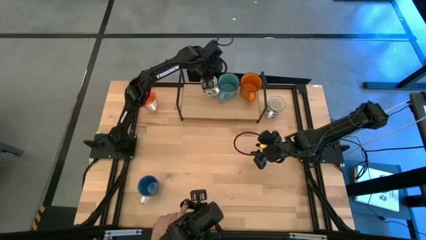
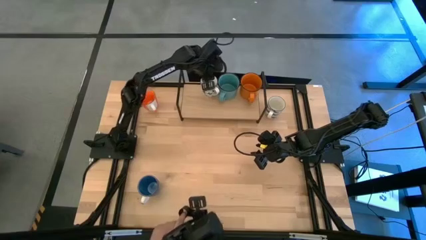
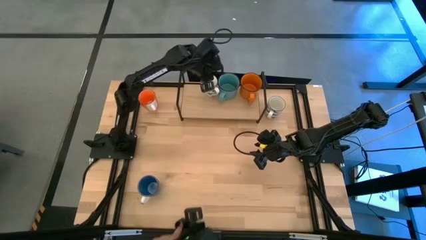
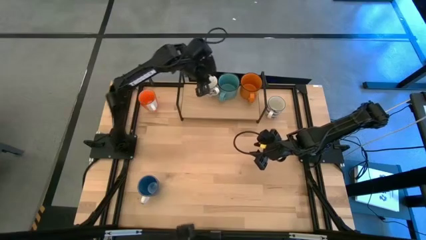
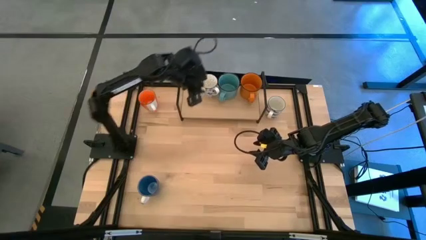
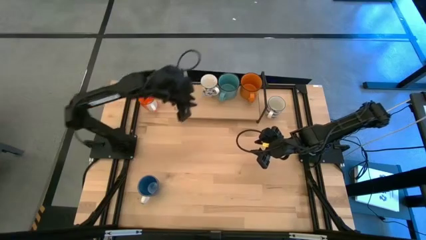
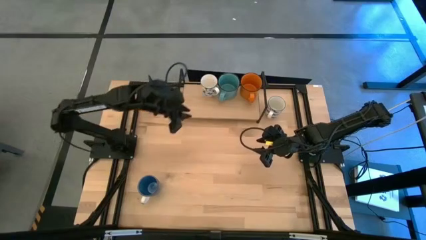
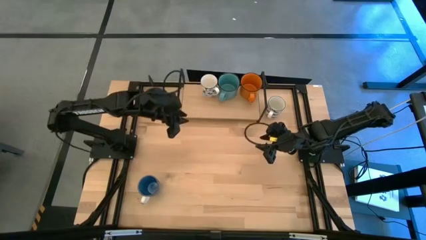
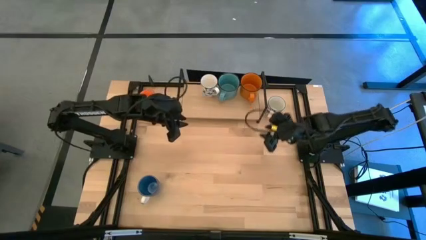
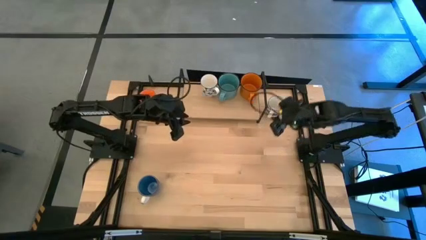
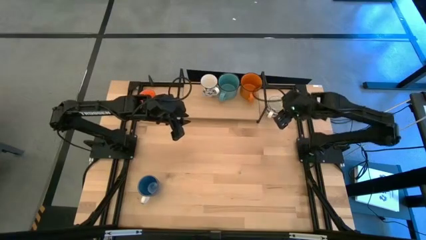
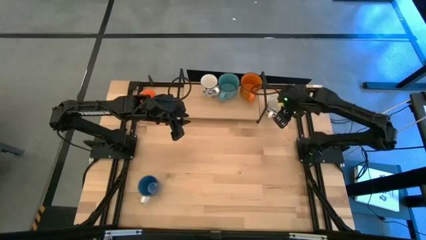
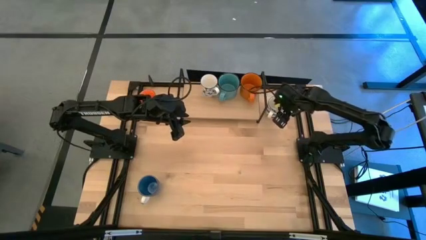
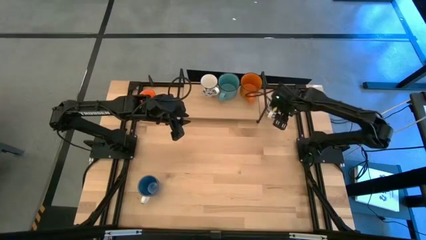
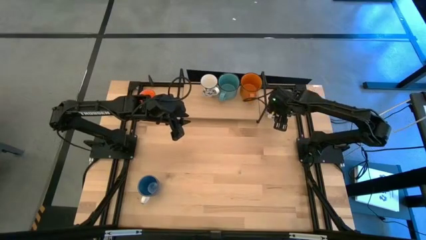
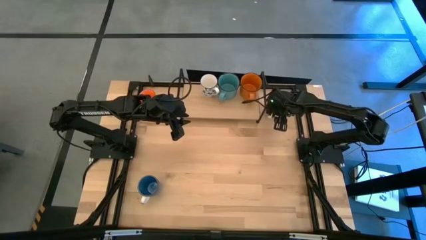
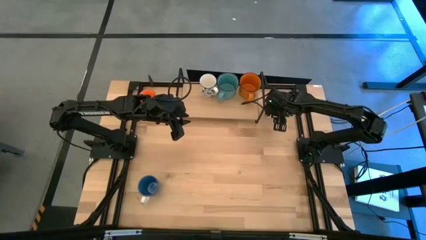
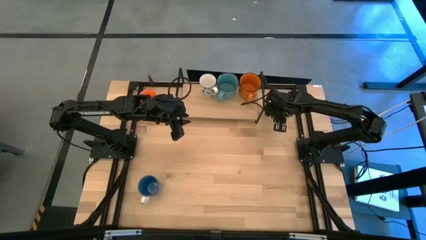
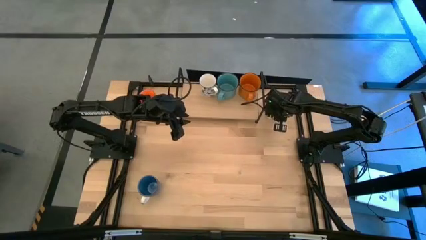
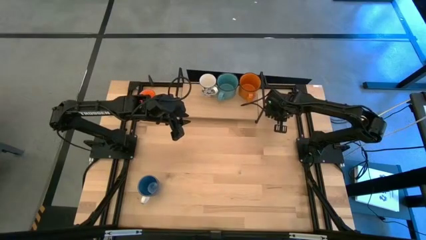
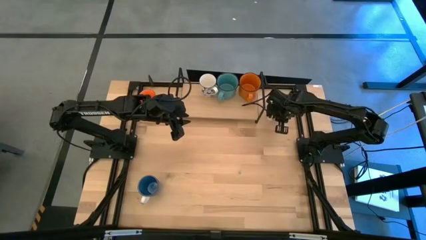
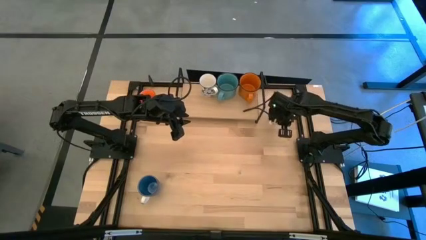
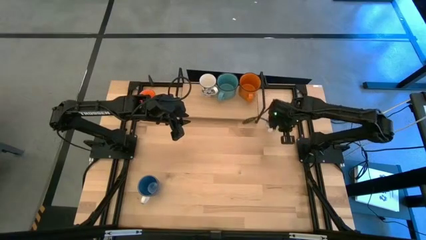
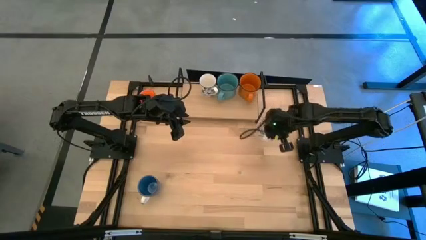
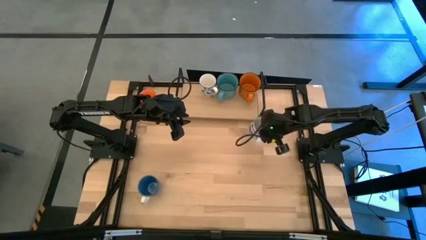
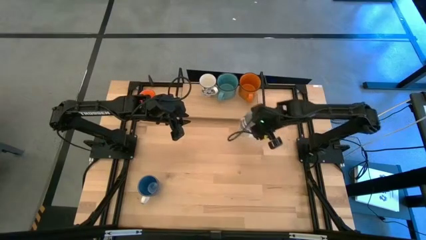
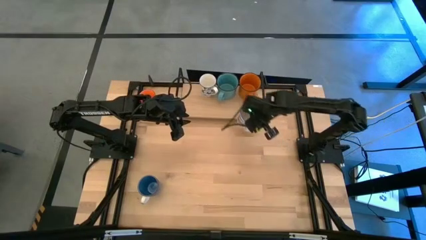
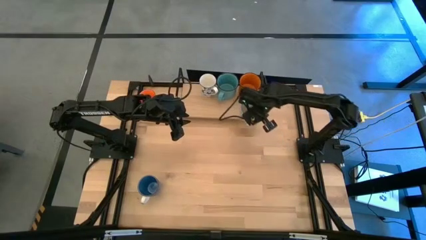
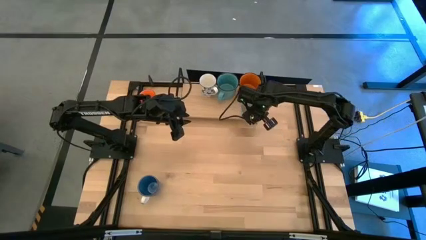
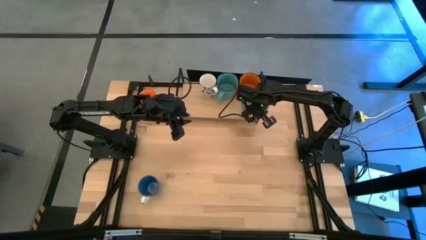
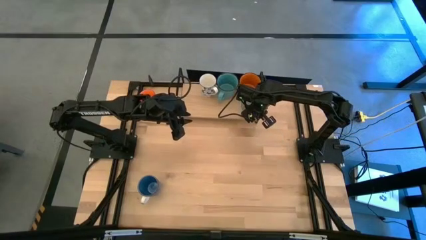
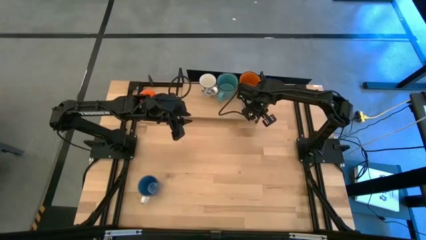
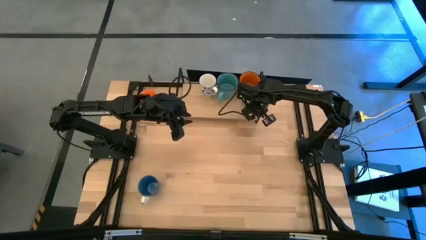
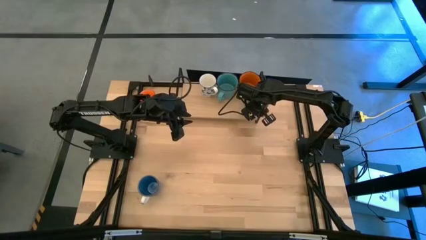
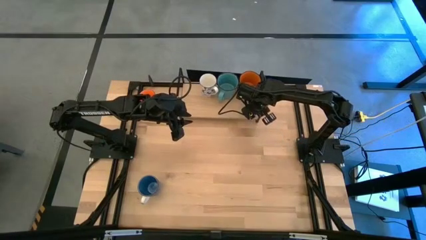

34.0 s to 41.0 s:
Task: Place coffee mugs
Put the blue-white mug on the shelf

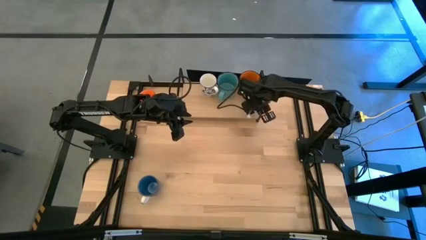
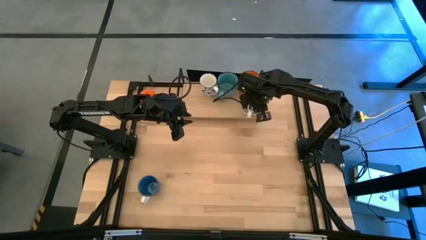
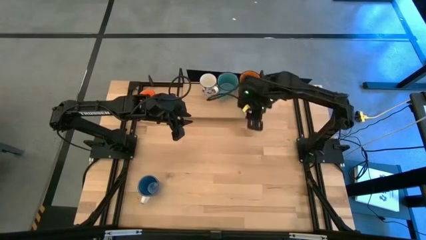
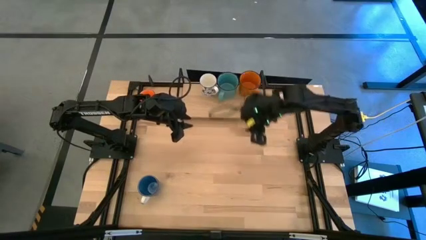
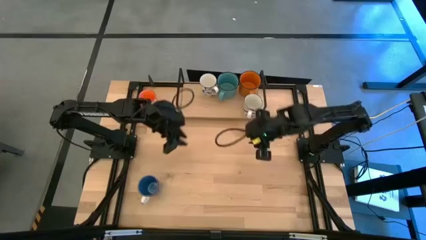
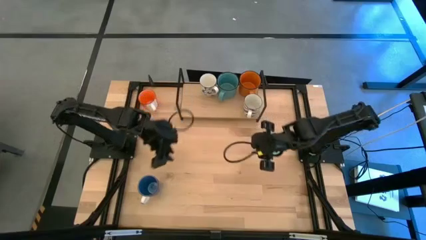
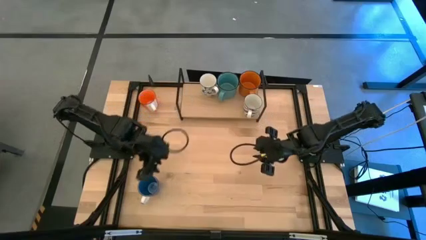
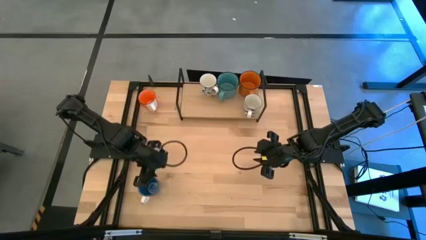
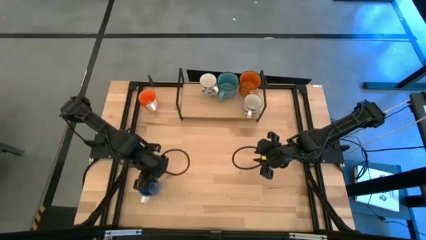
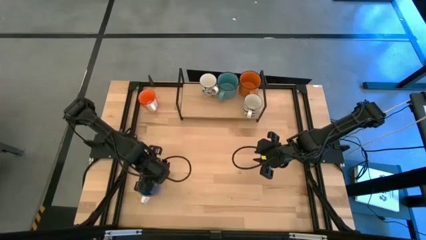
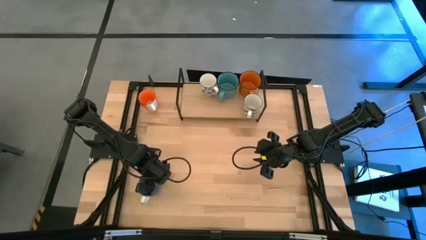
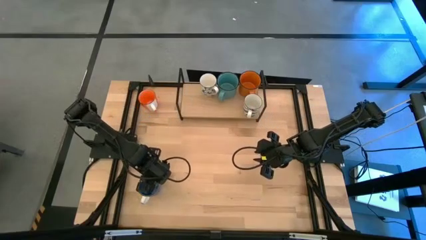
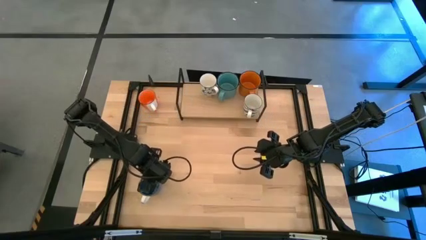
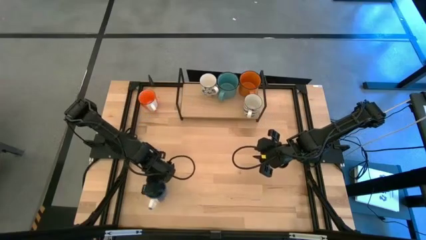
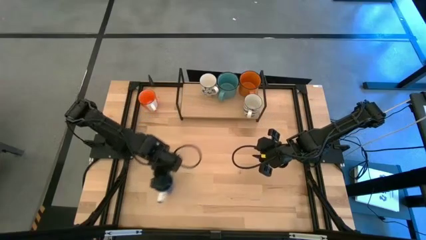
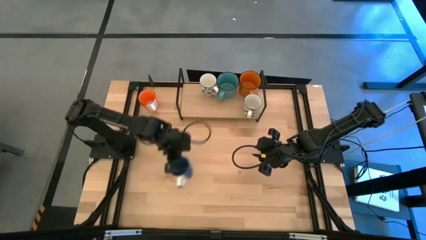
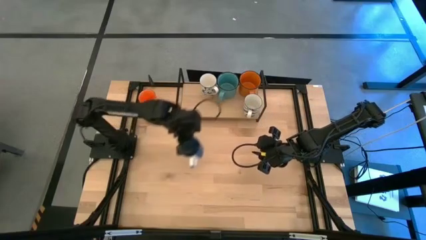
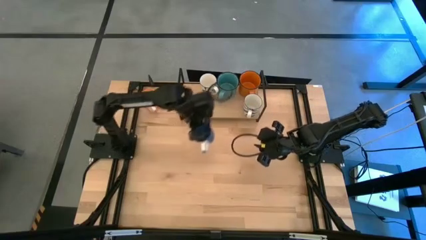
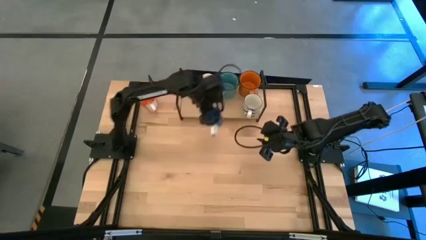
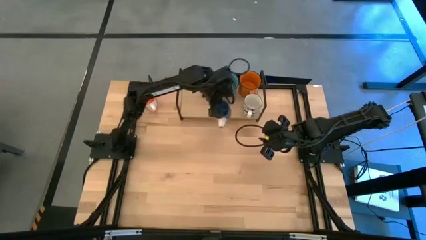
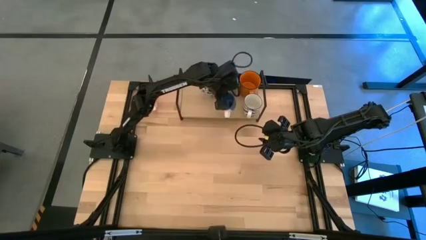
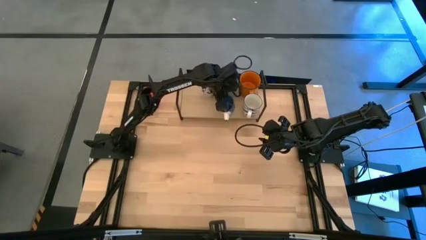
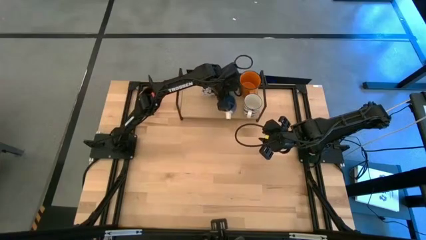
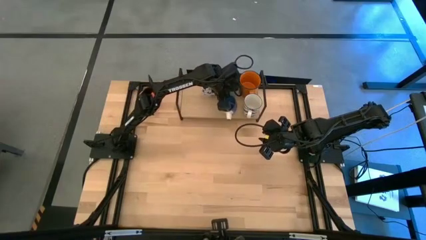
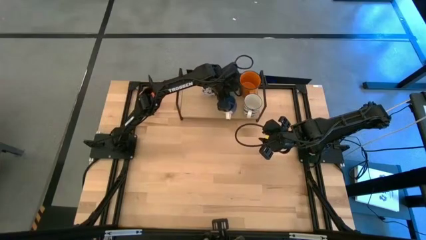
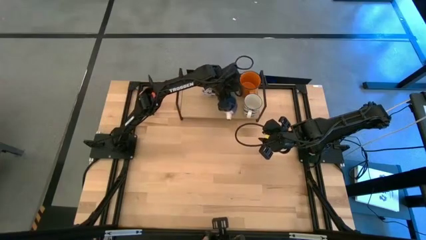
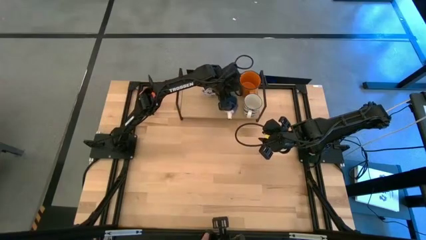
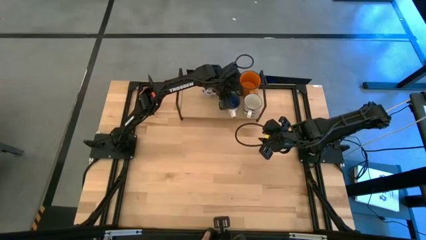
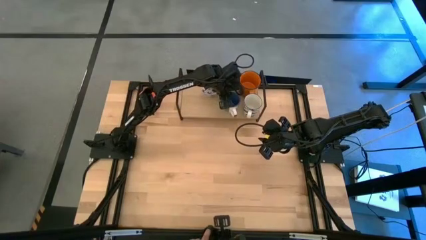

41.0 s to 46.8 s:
Put the blue mug on the shelf

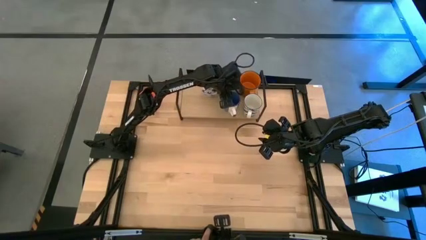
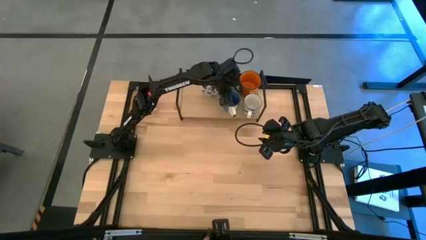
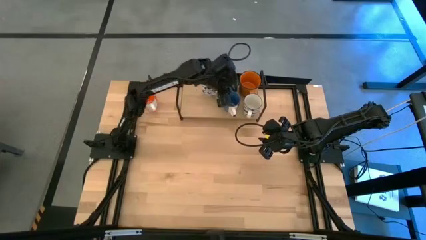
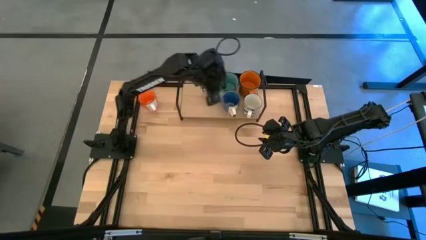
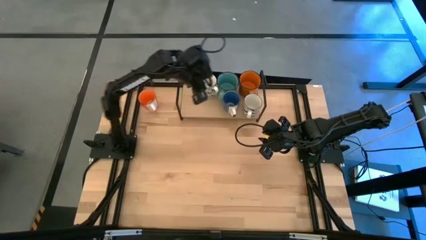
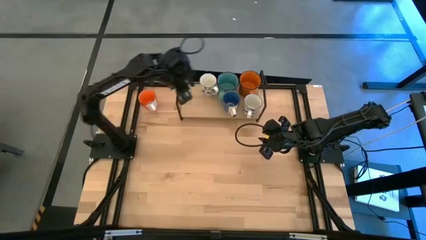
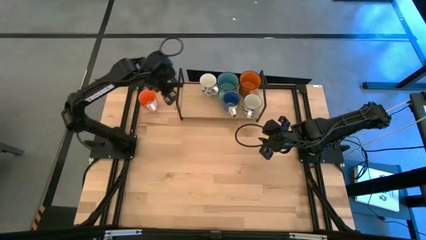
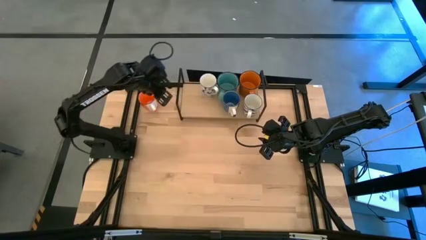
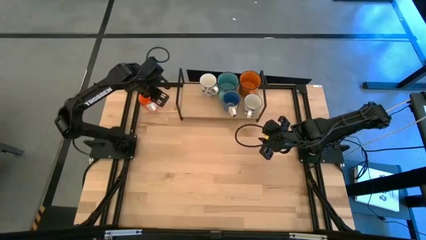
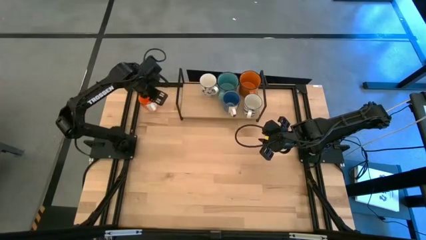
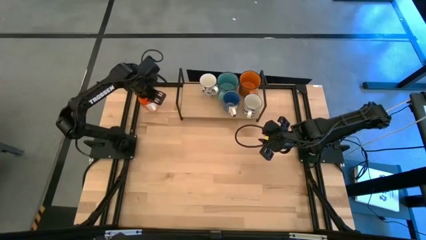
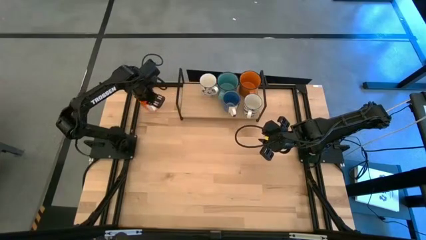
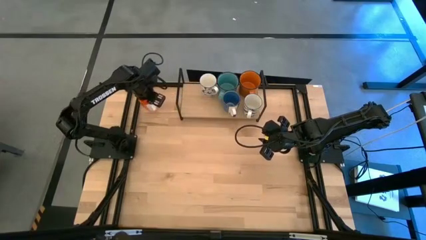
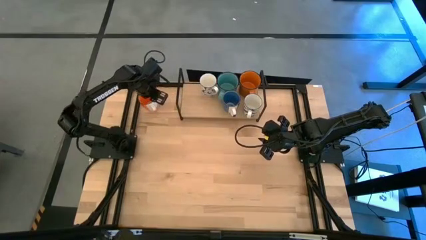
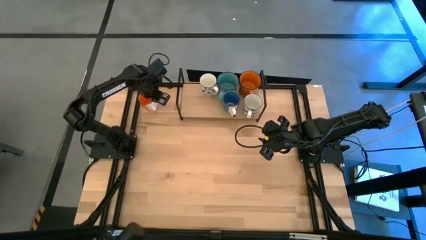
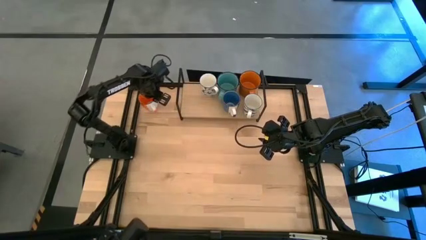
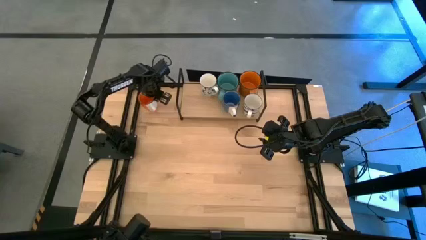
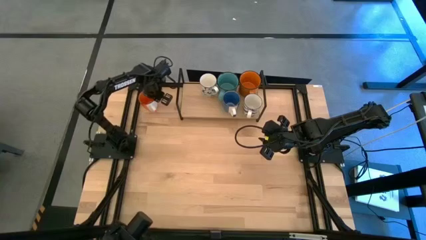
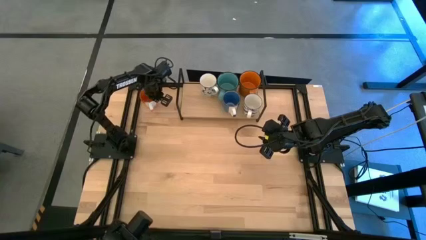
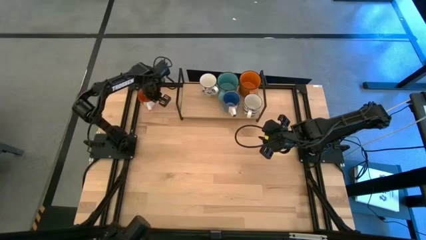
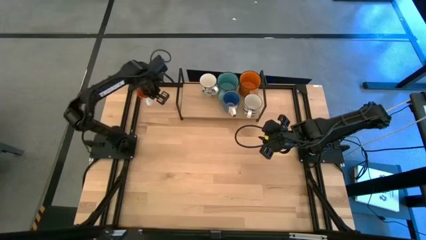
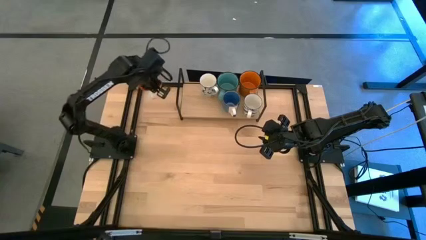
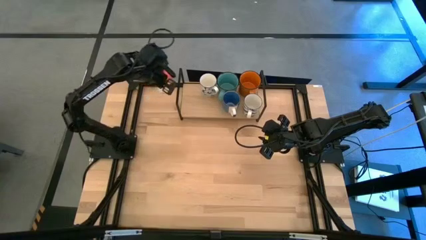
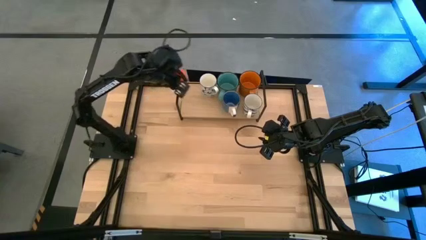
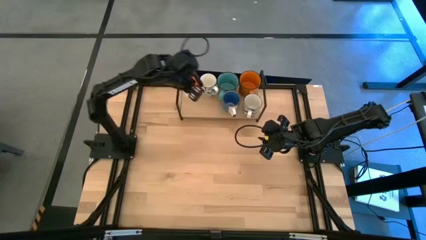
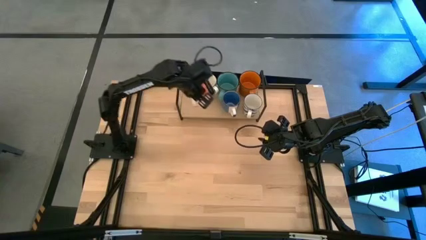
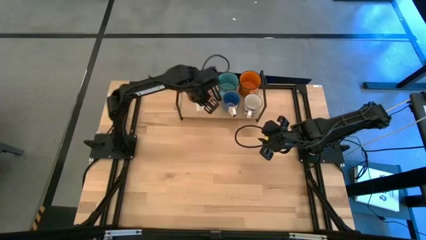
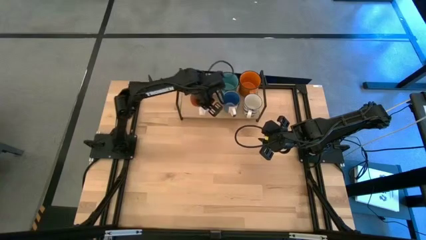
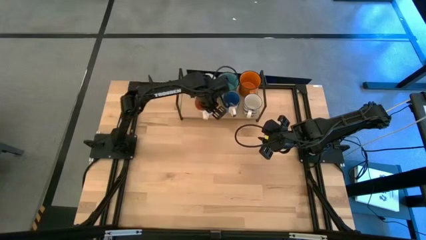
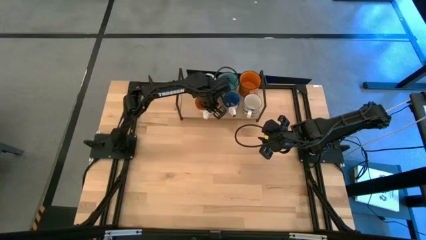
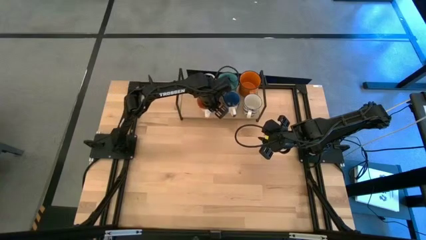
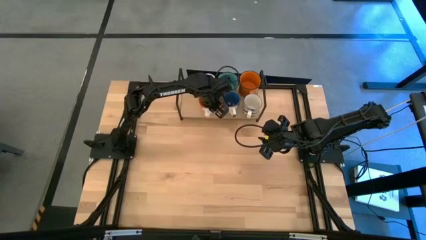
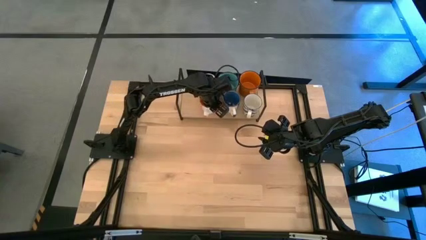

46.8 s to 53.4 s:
Put the orange mug on the shelf
